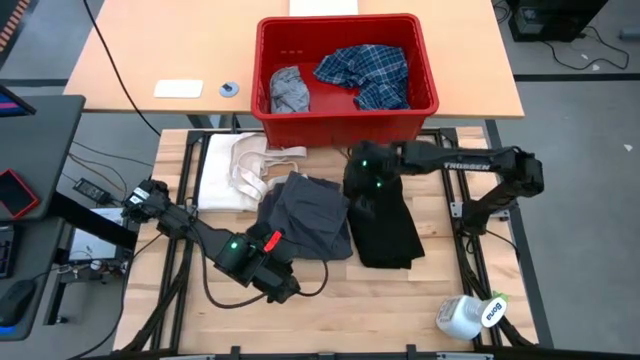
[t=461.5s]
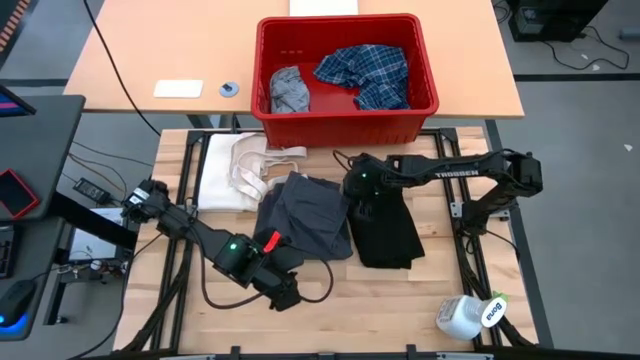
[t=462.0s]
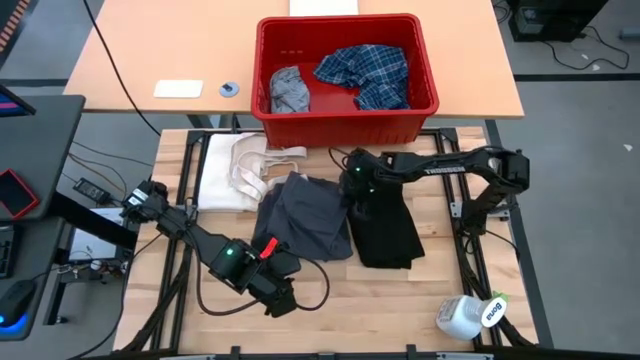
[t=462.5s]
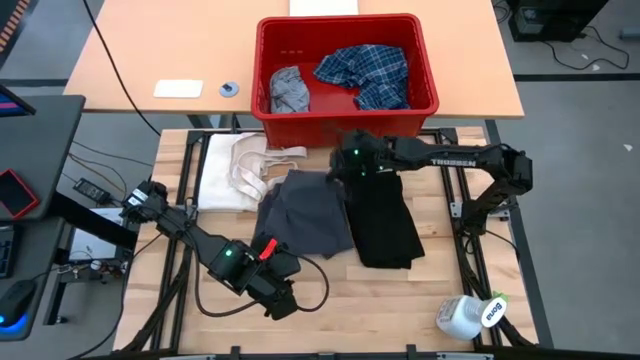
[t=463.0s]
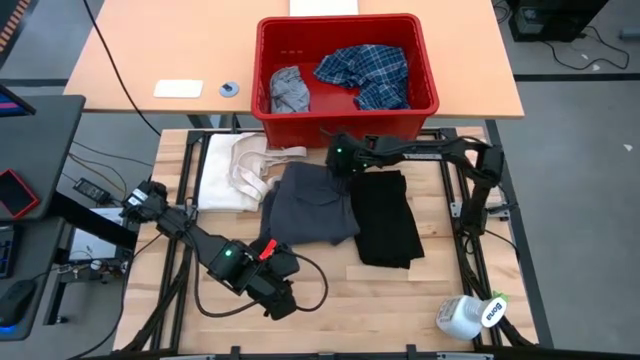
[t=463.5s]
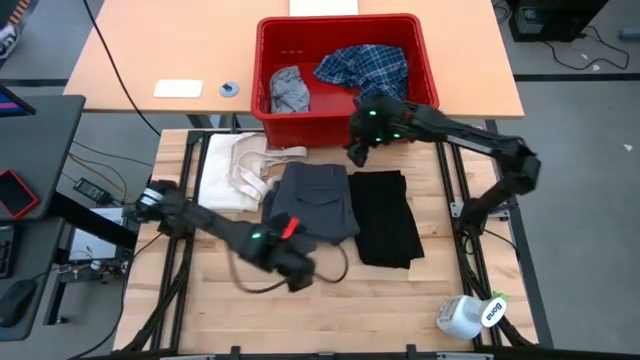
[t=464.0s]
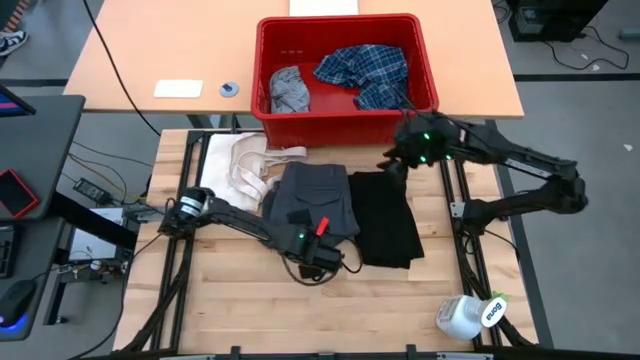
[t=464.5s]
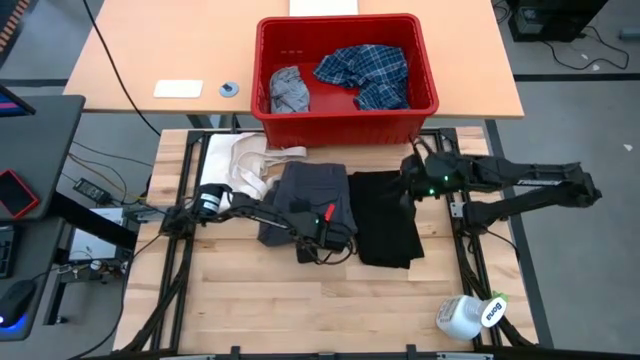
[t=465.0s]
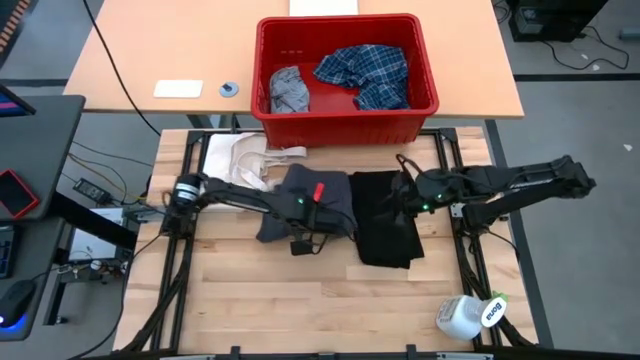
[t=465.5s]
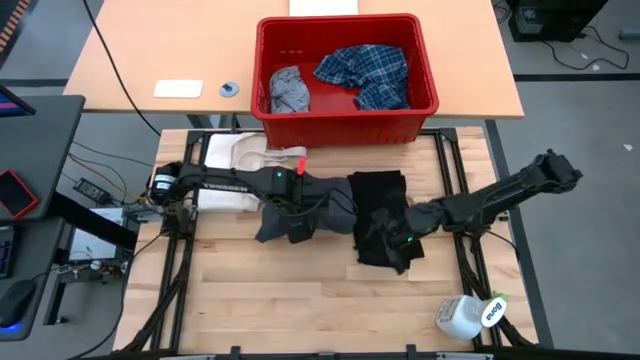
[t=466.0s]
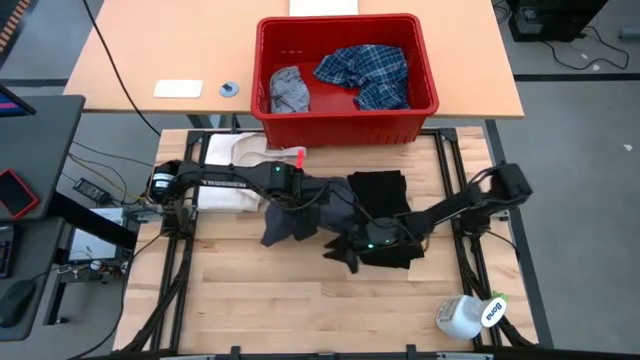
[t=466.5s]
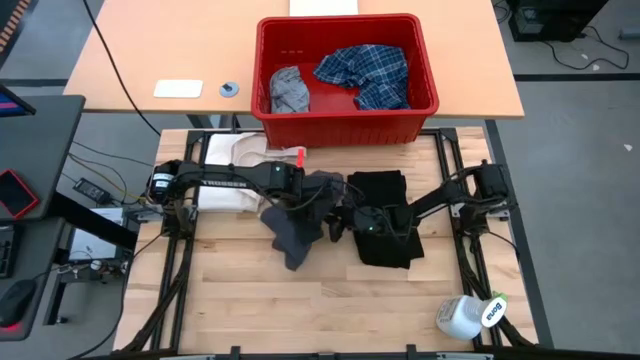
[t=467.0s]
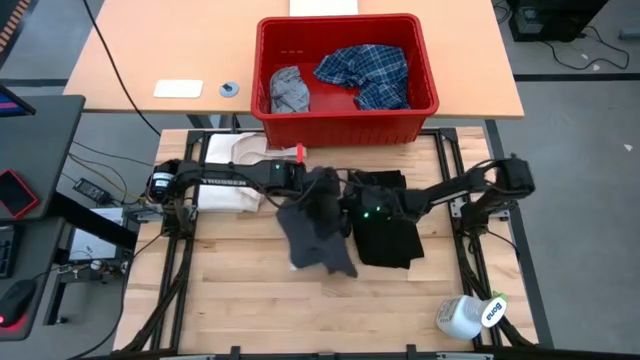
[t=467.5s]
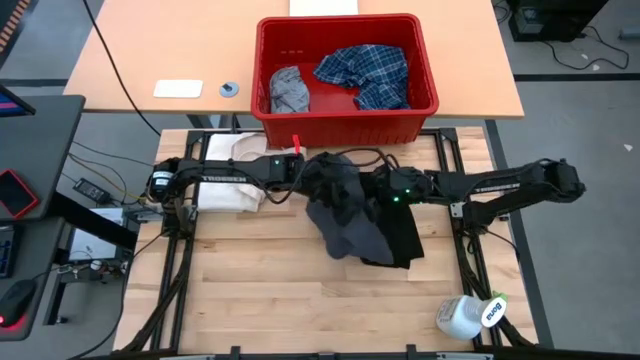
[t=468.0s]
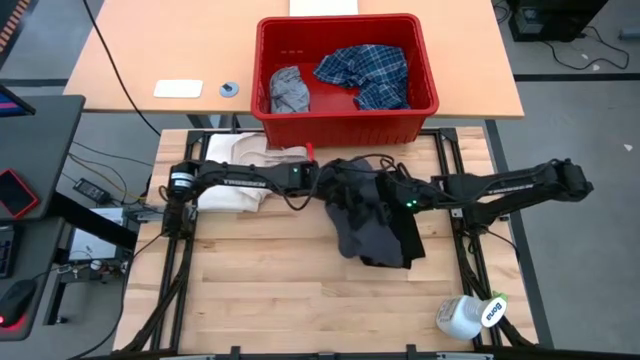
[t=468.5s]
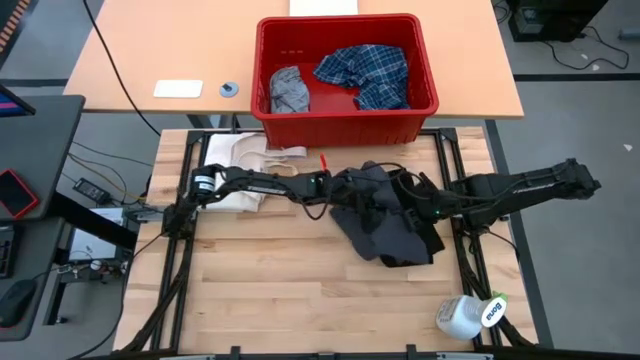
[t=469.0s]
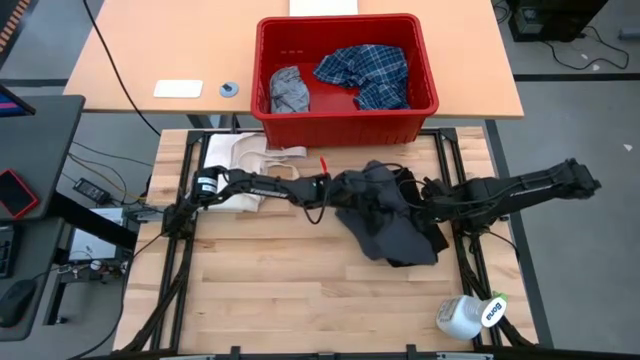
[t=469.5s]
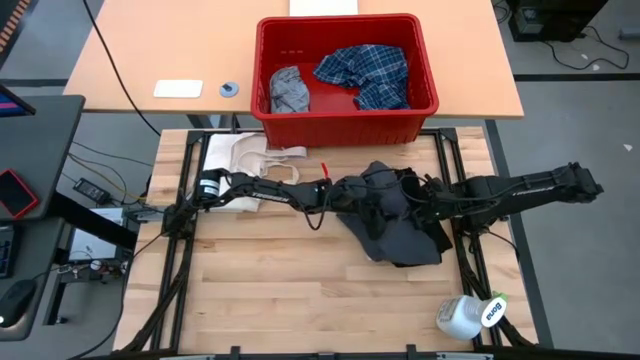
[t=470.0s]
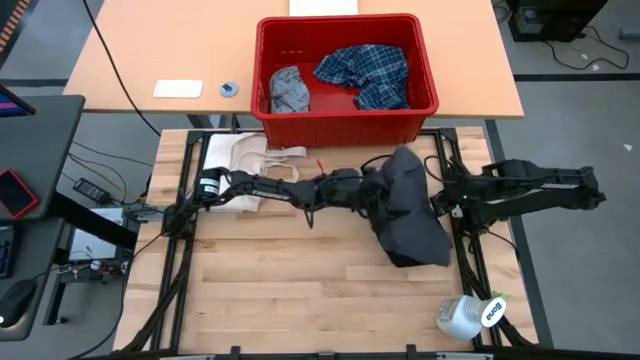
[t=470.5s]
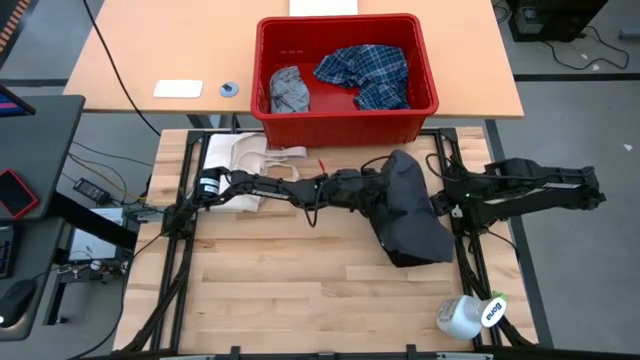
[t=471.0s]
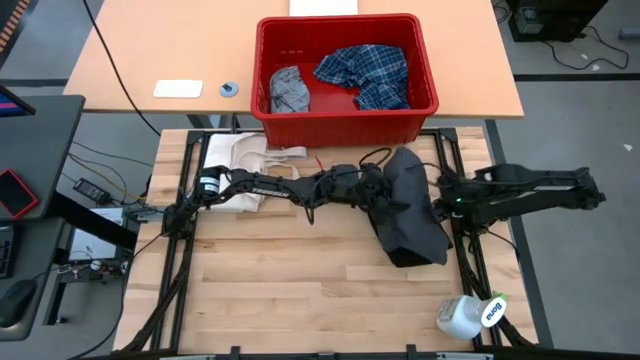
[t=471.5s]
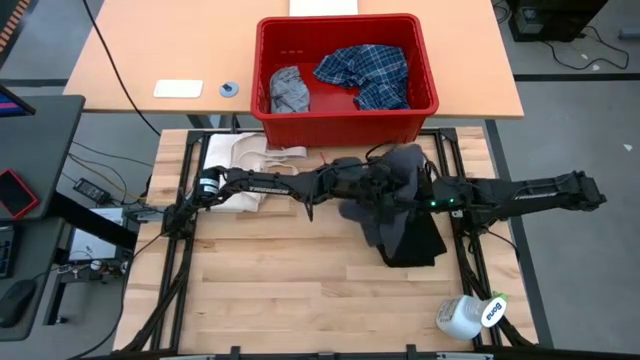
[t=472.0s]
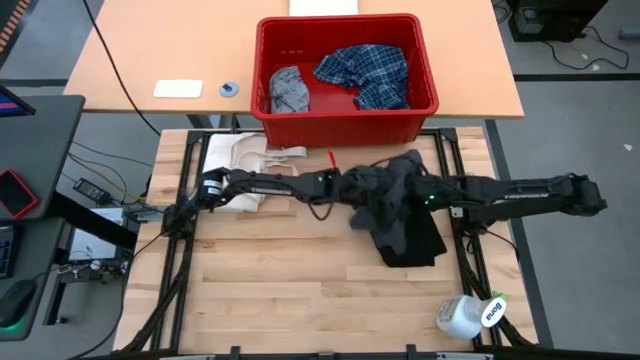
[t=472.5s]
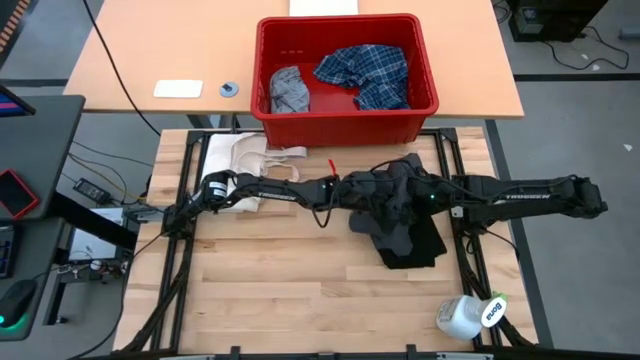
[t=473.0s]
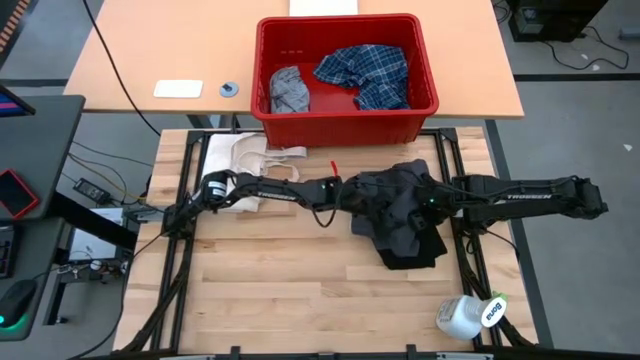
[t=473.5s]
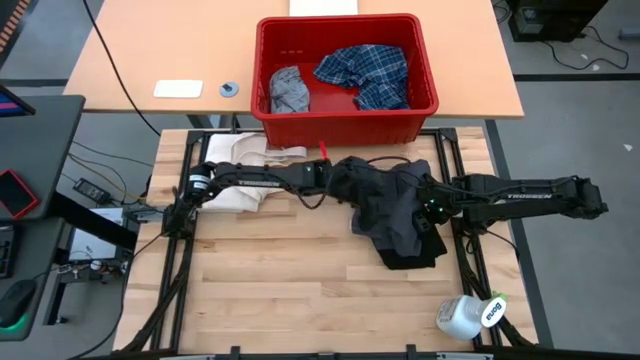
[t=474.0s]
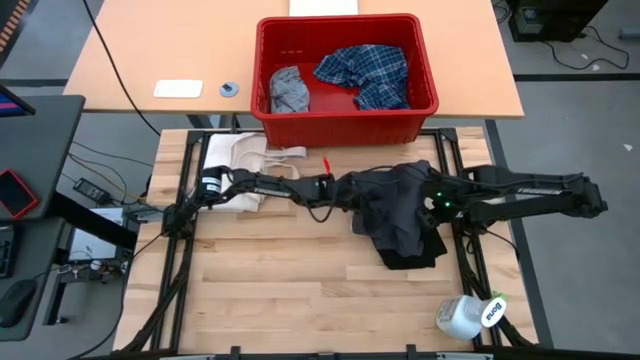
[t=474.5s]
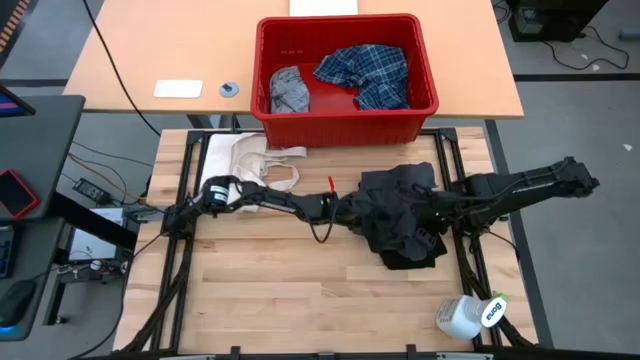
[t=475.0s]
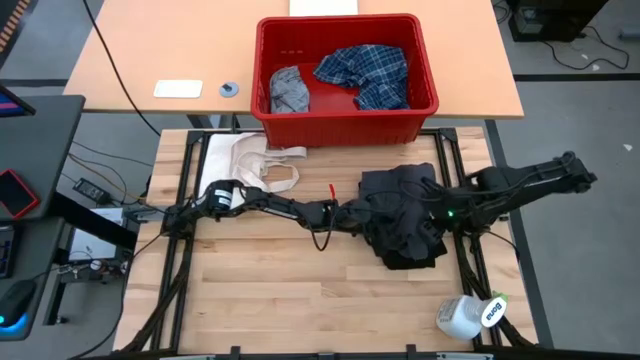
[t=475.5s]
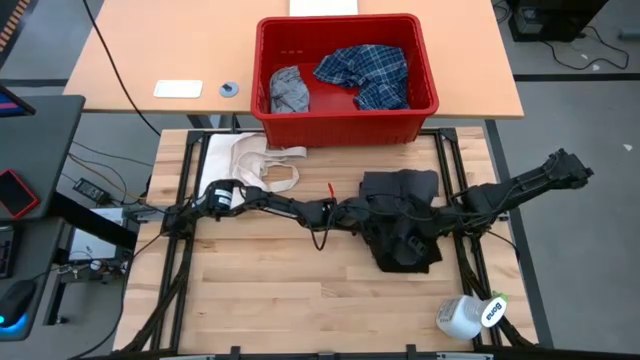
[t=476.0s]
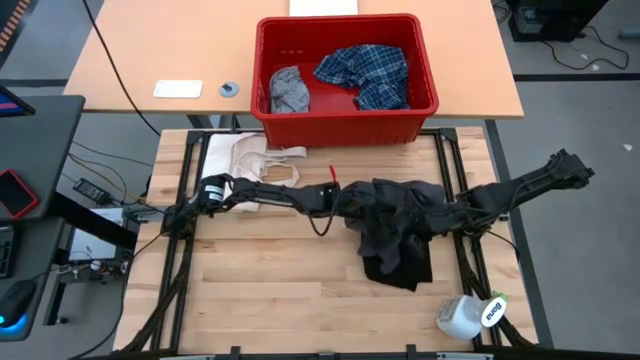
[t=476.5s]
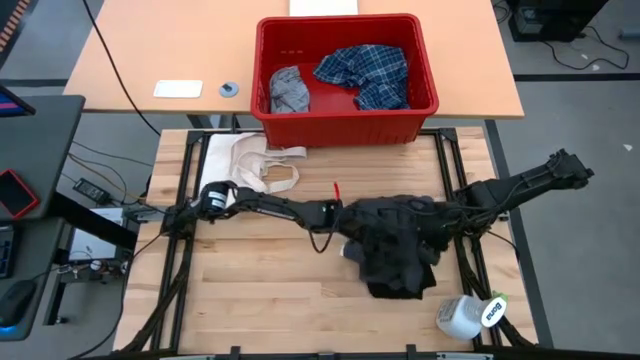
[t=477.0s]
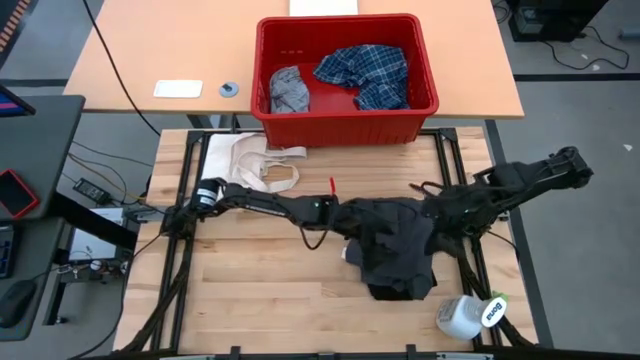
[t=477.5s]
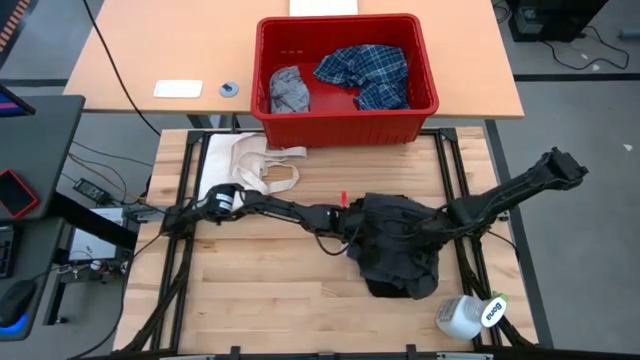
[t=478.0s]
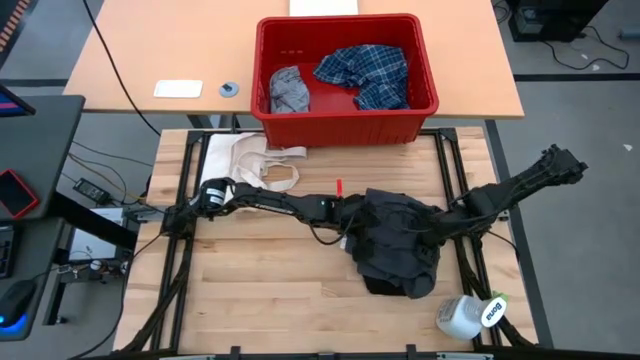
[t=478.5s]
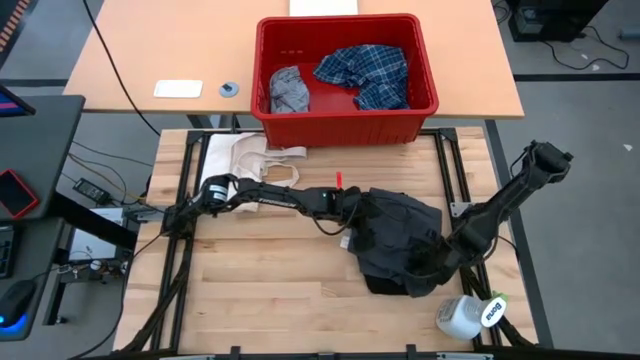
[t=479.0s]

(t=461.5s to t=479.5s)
Task: Fold Laundry from Bin
Stack the folded gray pants on top of the folded black shirt

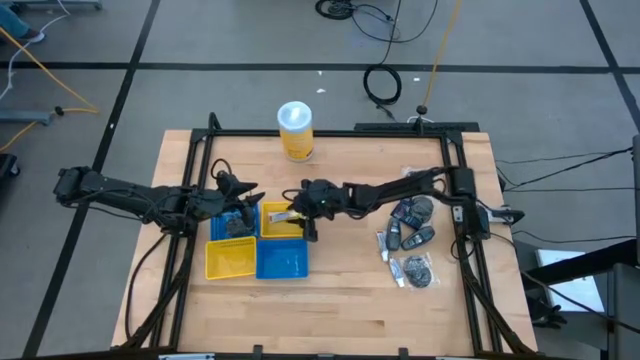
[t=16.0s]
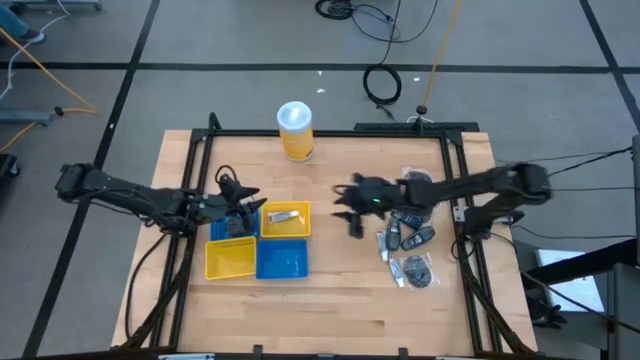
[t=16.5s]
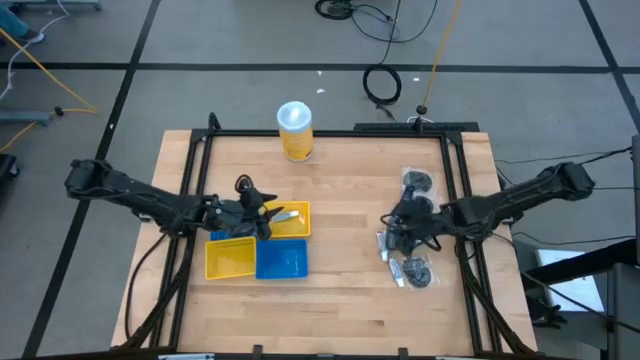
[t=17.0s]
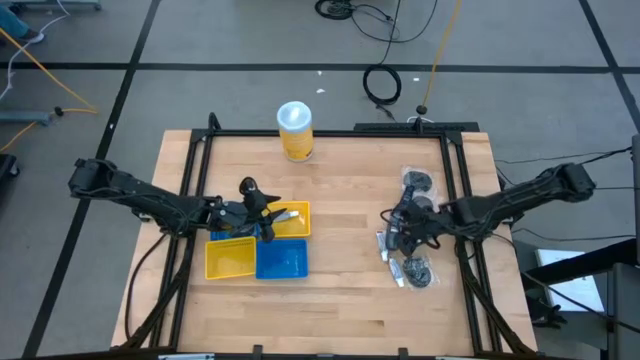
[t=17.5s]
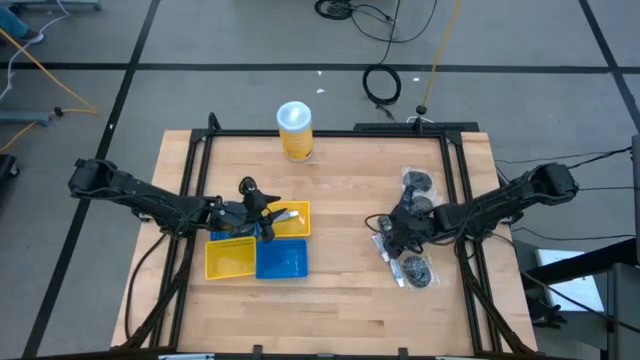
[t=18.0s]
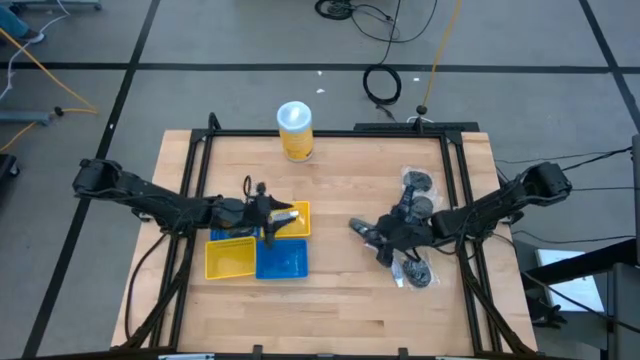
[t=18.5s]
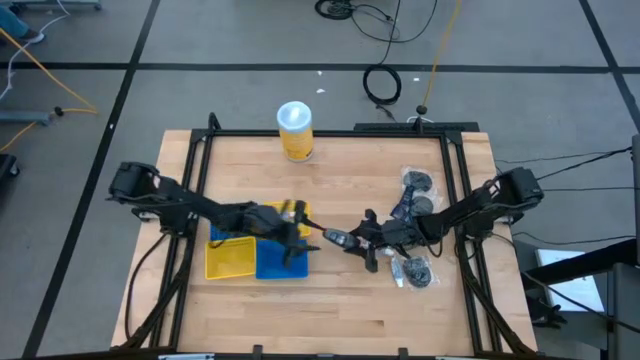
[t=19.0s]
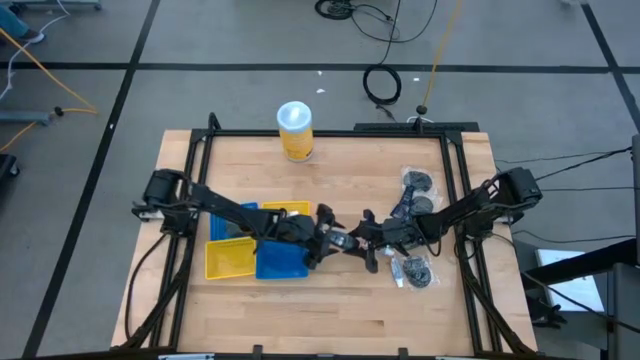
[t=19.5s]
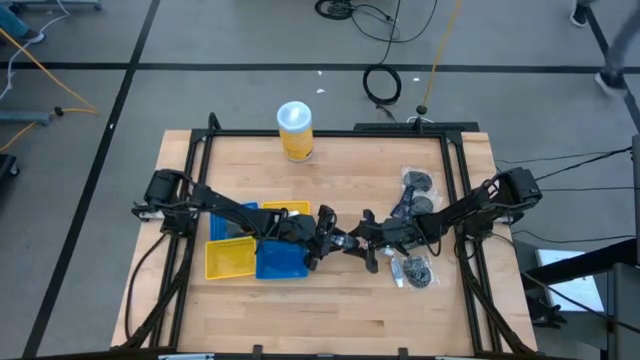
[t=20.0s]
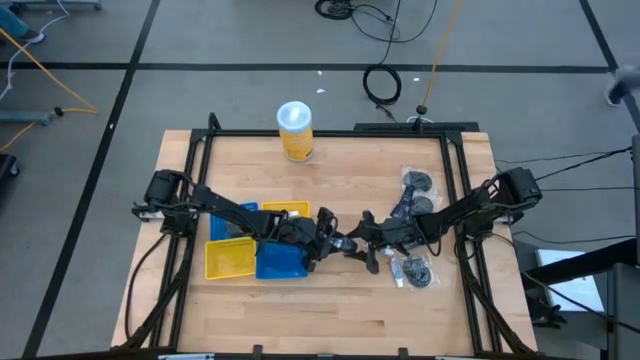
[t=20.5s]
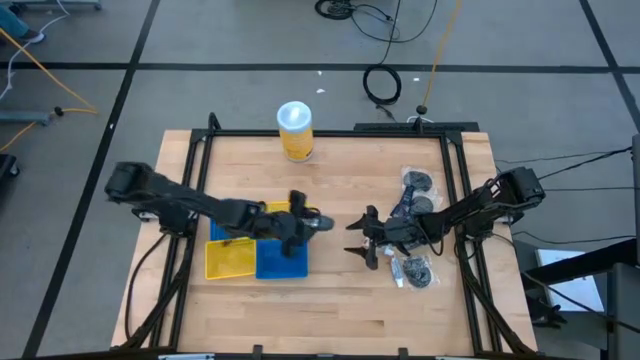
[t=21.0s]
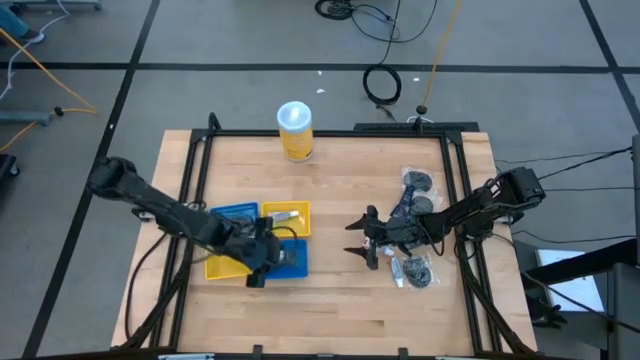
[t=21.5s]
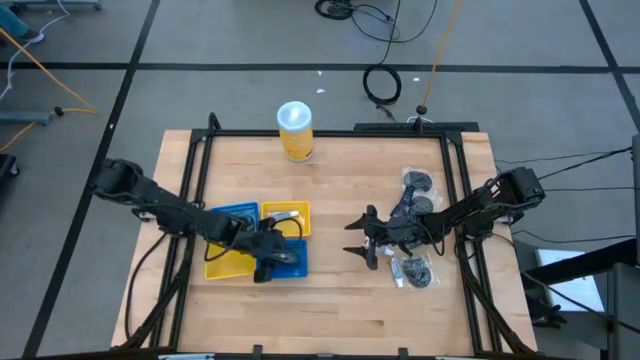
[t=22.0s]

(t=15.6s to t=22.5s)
Task: Pick & Place Travel size toiletries
Put the black deodorant into the bottom blue bin
